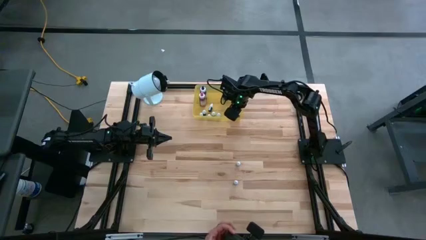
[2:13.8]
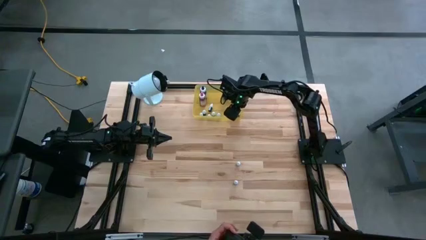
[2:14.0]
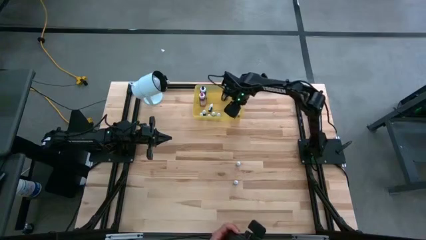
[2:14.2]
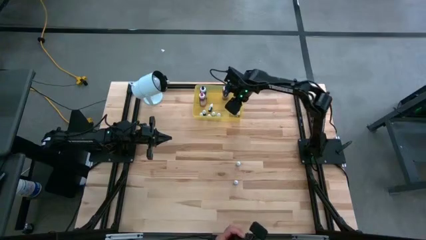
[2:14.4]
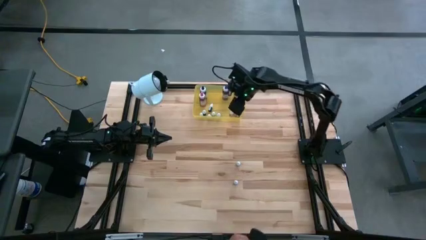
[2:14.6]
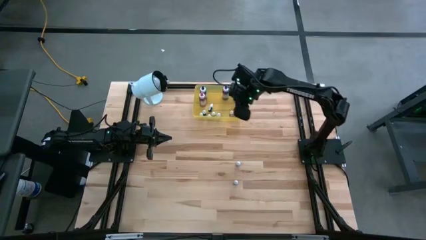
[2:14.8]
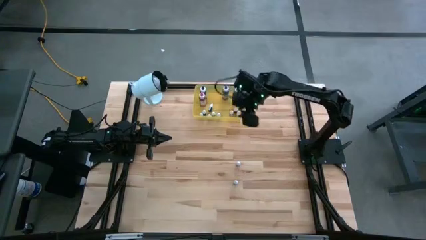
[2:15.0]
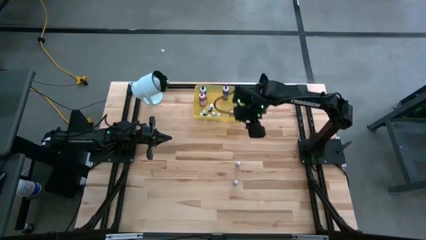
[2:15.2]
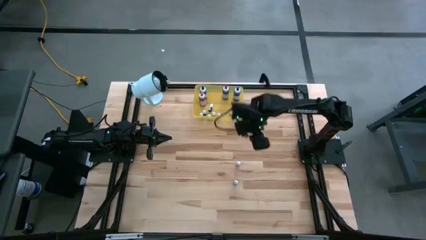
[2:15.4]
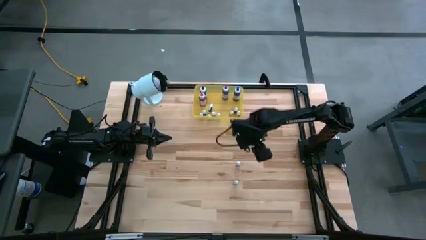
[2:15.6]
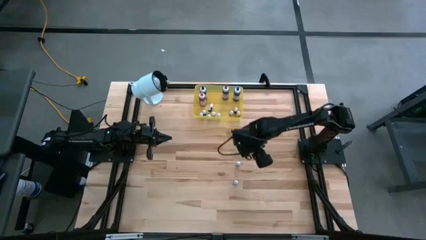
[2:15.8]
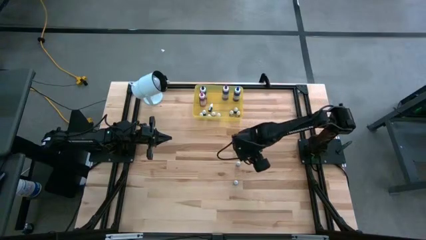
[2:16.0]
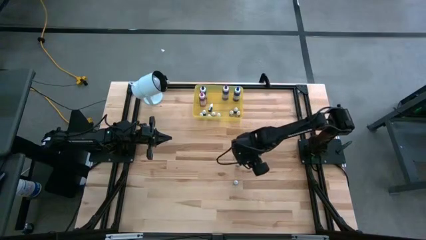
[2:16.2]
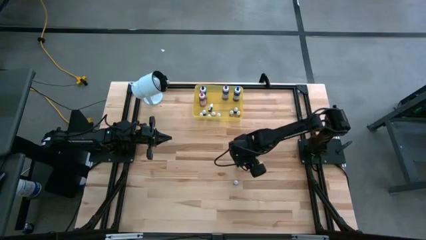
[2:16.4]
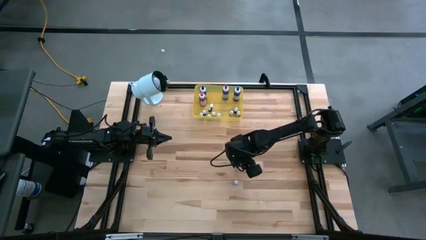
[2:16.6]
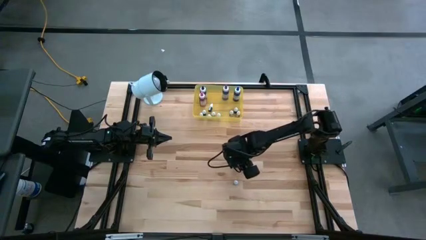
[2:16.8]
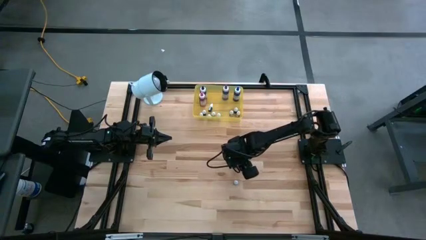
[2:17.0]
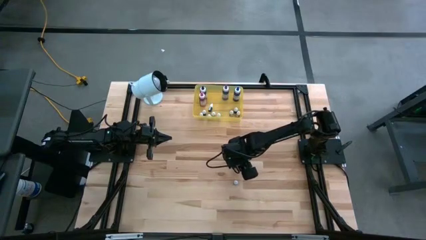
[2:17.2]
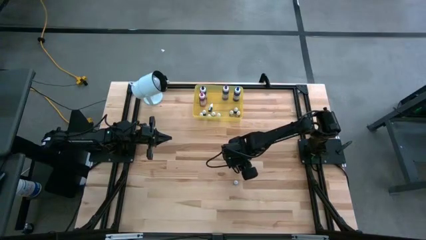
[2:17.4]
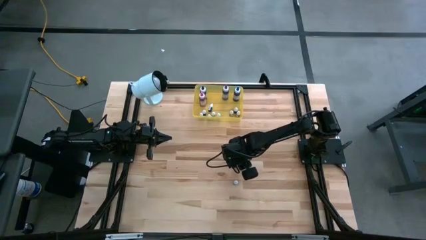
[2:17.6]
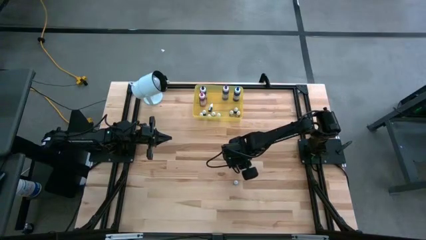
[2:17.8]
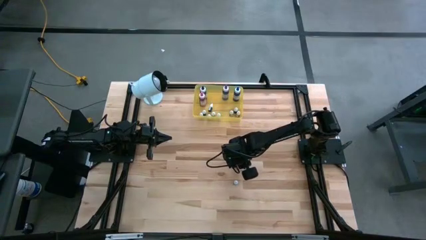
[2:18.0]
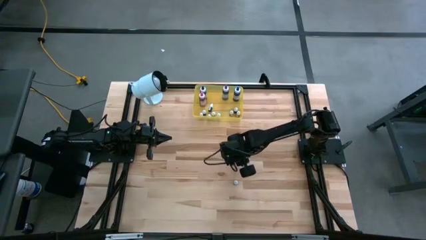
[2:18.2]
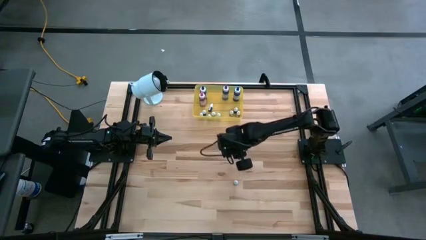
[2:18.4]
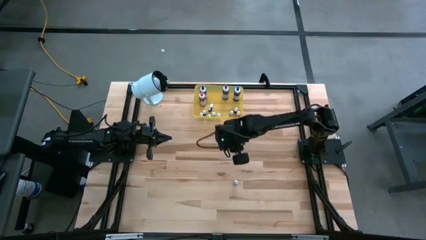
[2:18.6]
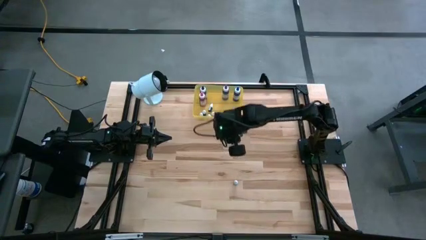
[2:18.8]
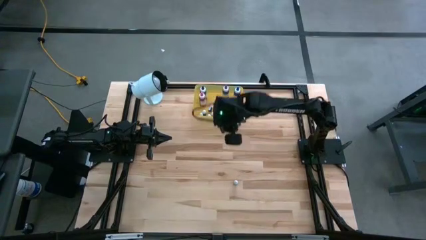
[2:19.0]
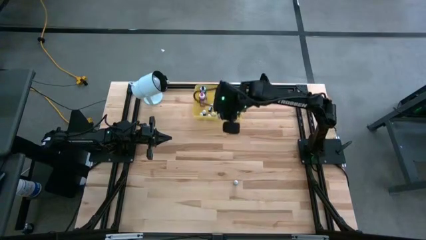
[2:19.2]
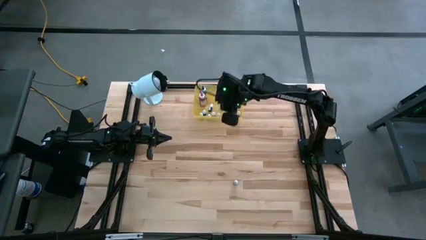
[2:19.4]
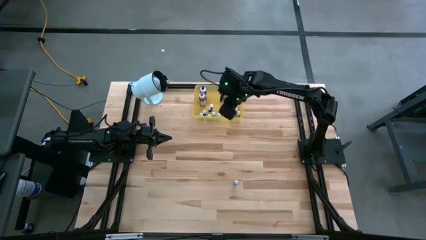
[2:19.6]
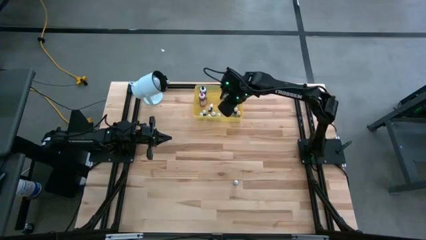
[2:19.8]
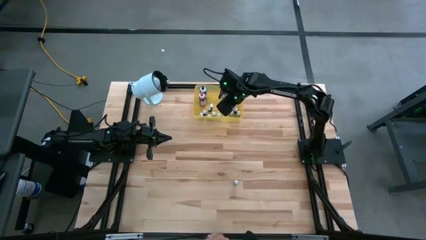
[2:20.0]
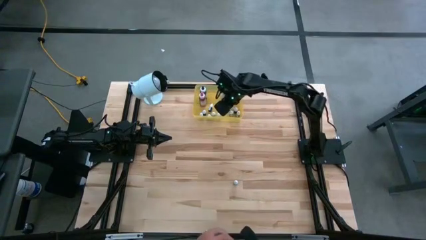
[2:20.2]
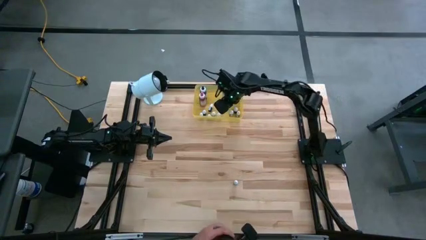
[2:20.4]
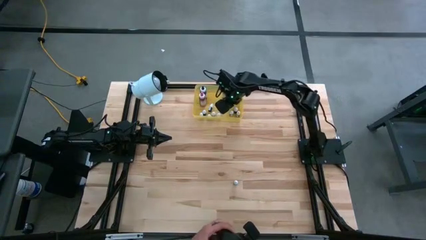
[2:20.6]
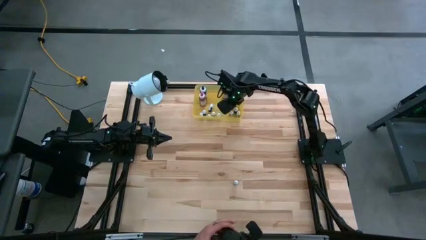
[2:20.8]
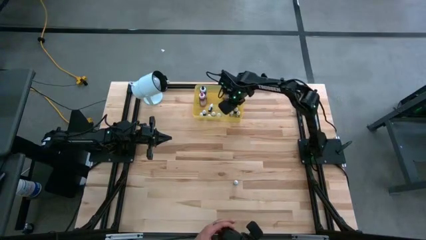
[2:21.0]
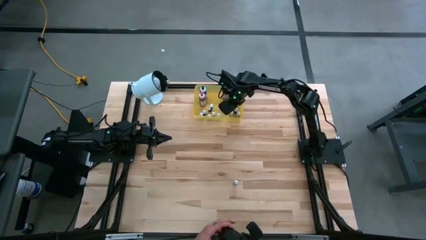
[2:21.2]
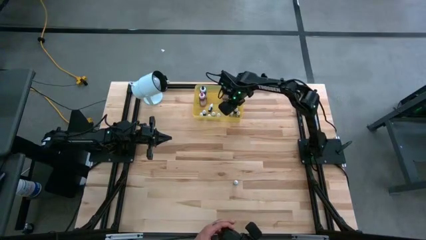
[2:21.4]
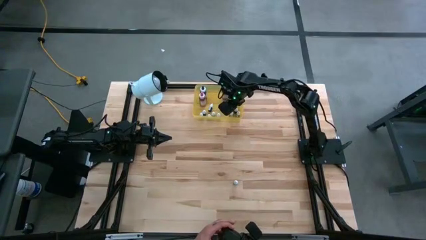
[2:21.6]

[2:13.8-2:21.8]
Task: Pick & Place food coloring
Put the small light green food coloring bottle into the yellow container

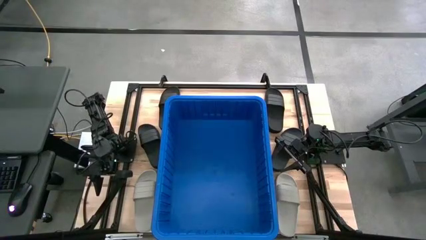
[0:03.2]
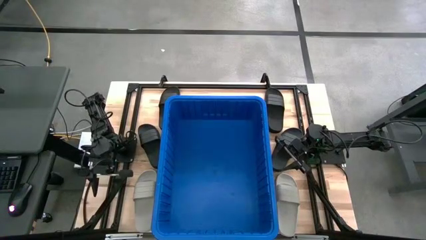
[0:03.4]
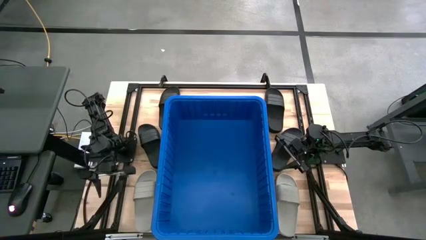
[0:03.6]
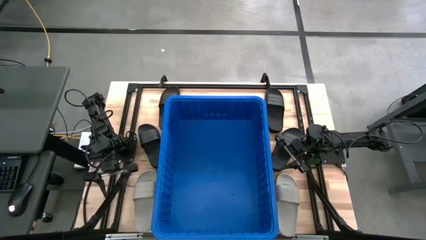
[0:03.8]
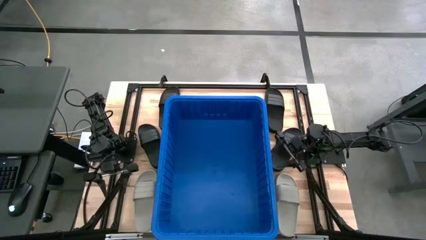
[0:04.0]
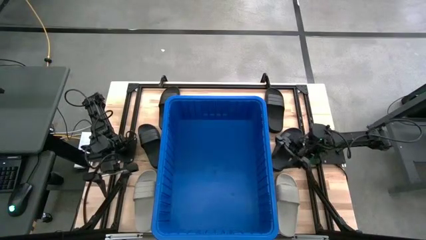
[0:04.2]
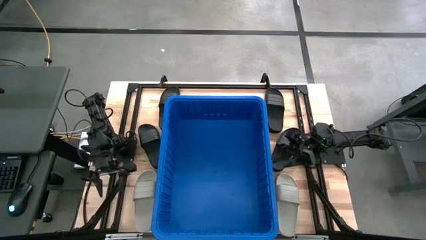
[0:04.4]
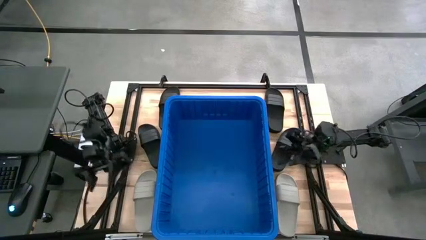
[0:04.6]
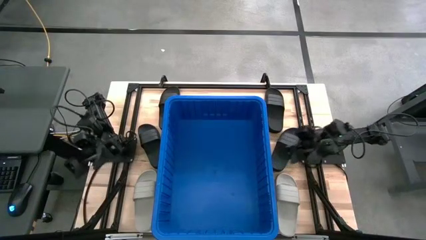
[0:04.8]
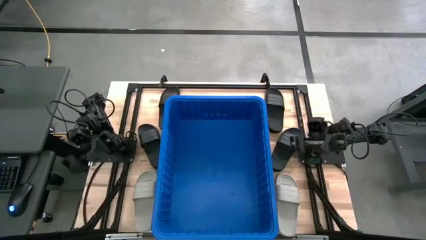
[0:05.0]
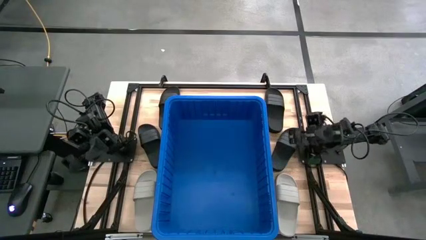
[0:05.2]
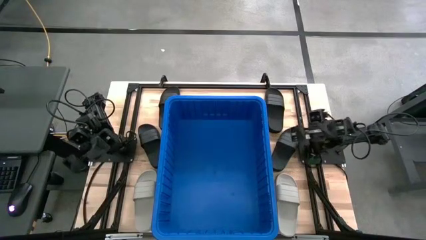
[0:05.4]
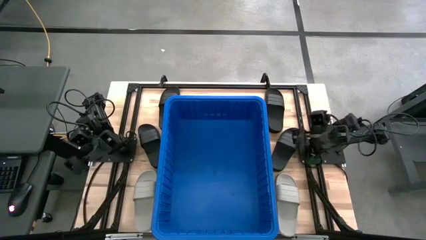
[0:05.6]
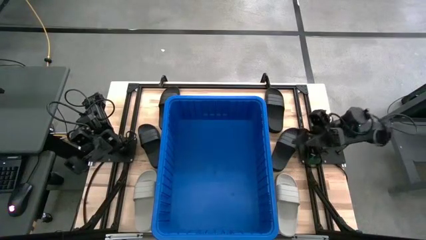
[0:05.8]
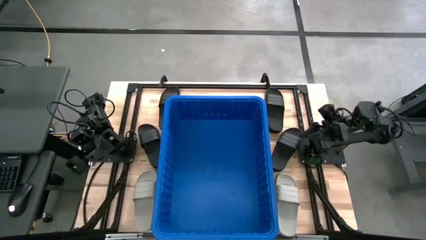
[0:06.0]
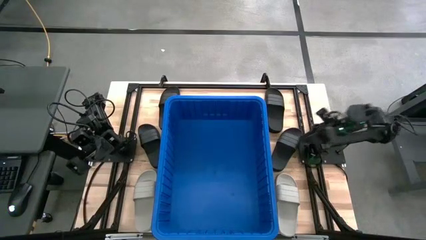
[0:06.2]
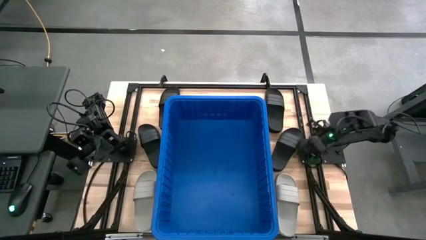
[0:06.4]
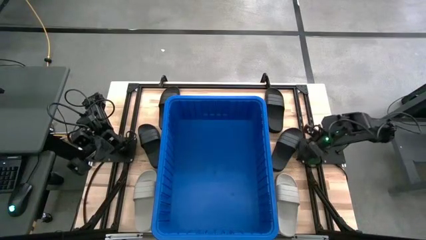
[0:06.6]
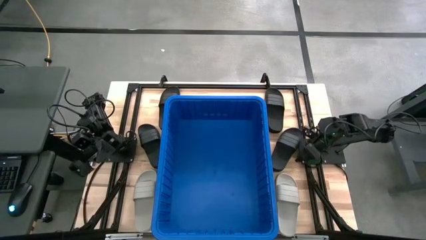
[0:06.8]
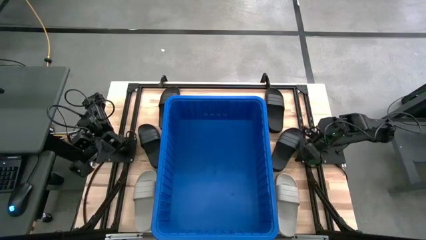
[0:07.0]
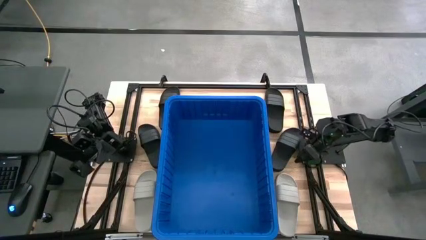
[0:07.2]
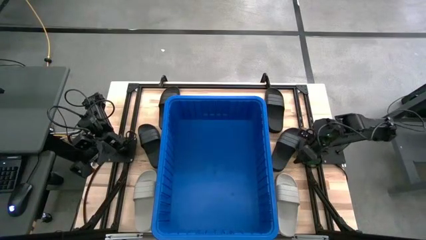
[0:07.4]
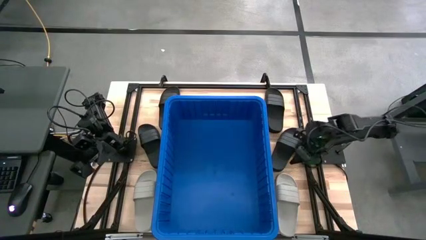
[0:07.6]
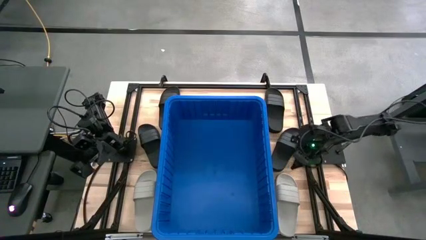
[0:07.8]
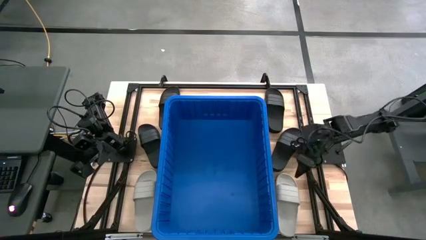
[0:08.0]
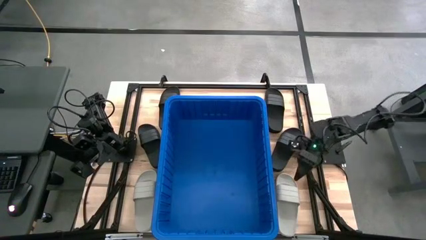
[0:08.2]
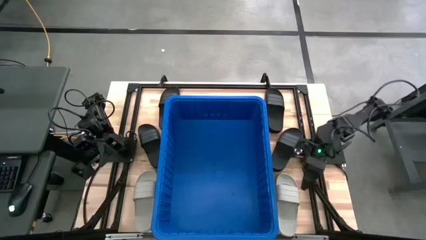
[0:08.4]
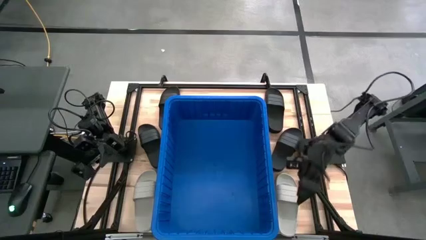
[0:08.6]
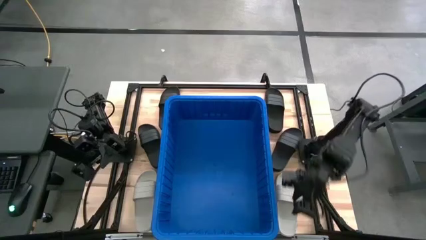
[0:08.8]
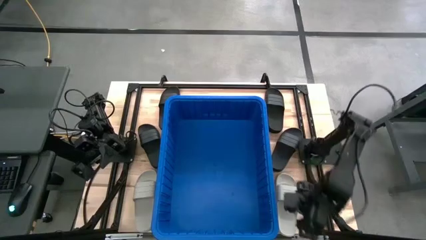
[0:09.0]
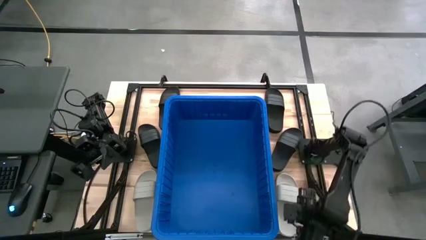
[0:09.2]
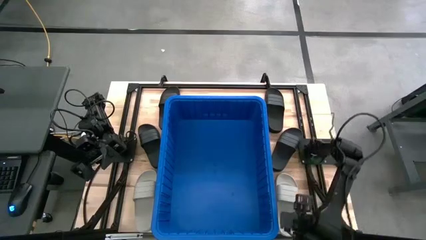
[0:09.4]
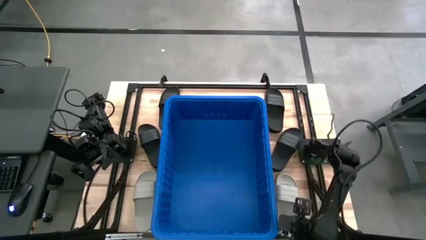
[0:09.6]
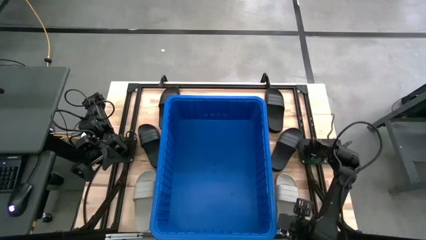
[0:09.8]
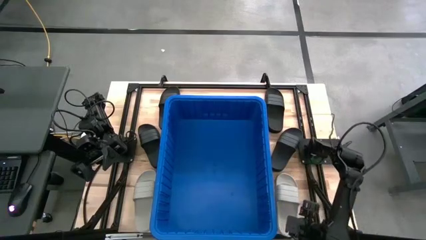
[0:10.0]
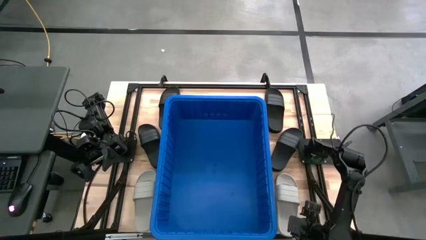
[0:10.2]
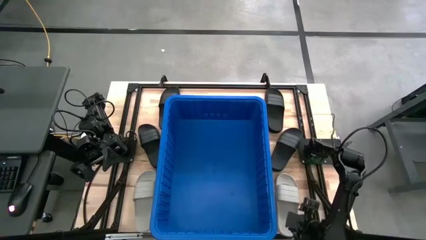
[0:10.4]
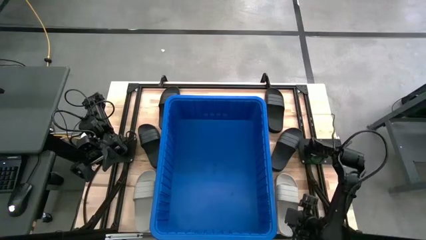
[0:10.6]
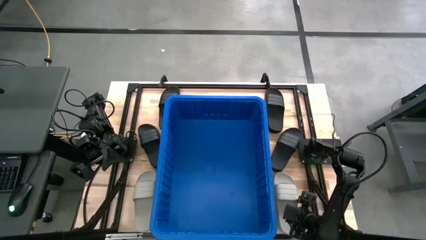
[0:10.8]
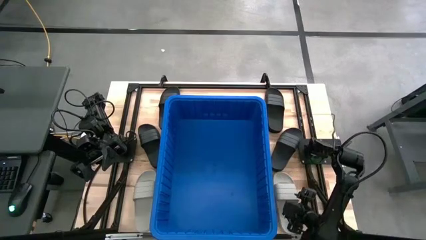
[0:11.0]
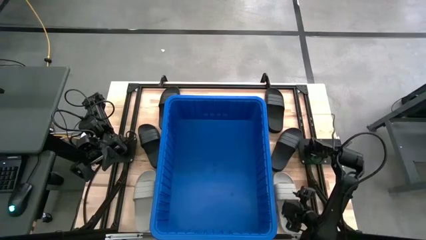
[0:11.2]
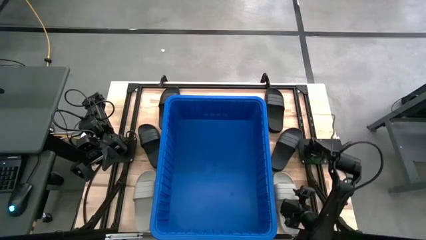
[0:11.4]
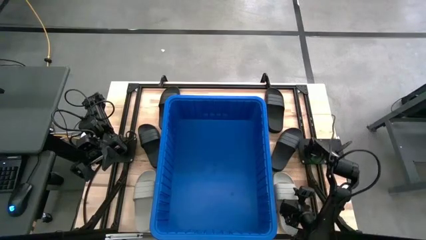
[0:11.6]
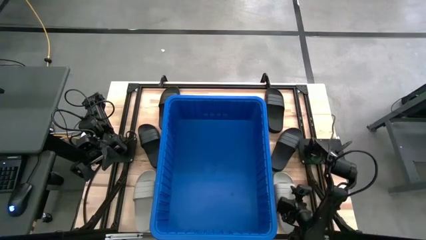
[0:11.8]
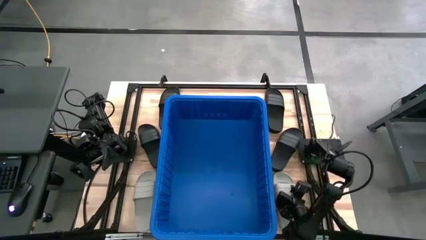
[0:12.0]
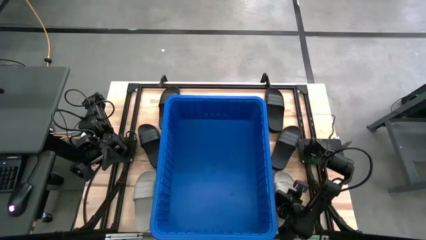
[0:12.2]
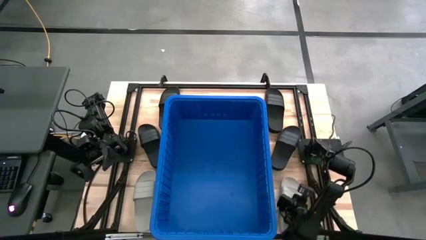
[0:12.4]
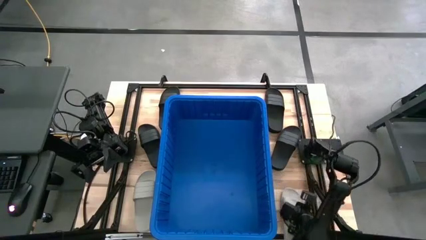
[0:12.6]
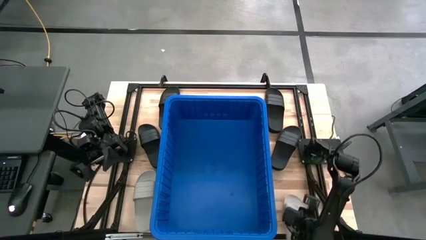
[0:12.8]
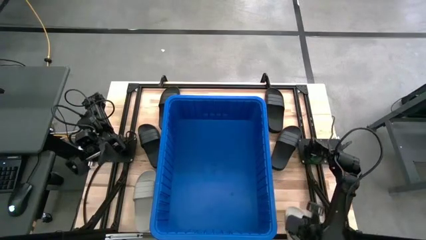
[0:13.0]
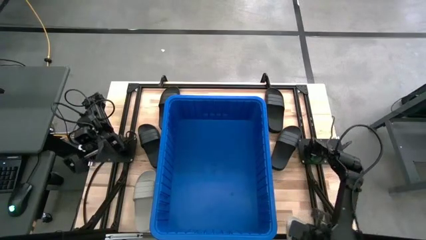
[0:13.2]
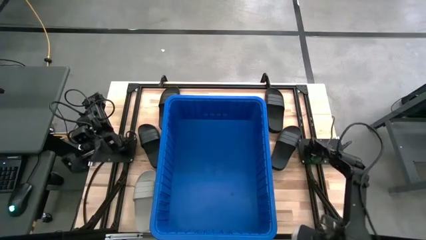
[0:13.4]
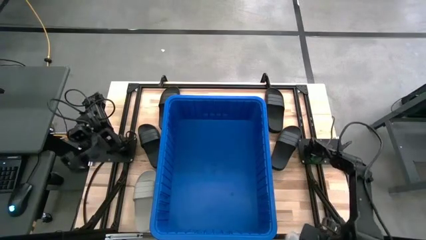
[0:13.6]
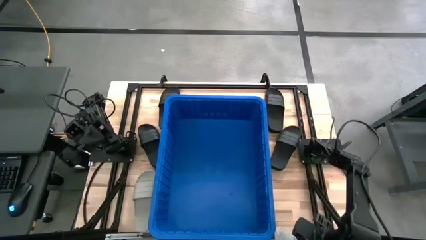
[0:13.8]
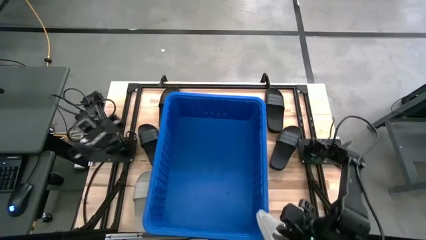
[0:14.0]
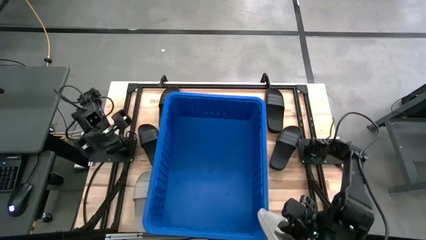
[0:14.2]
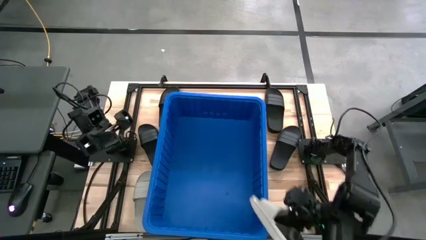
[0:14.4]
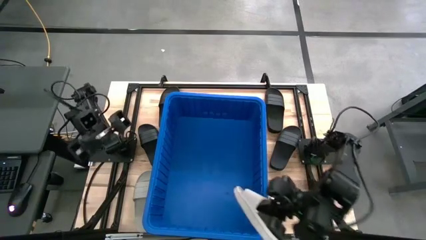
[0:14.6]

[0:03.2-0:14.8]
Task: Pick and place slides into bin
Put the gray slider into the blue bin
